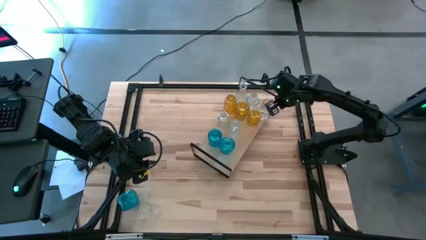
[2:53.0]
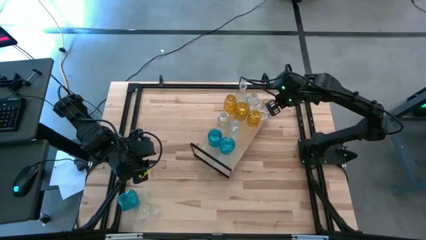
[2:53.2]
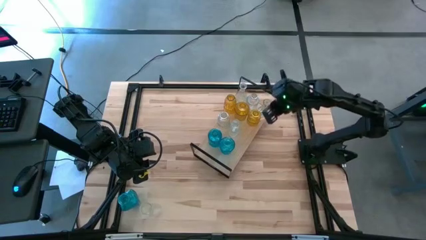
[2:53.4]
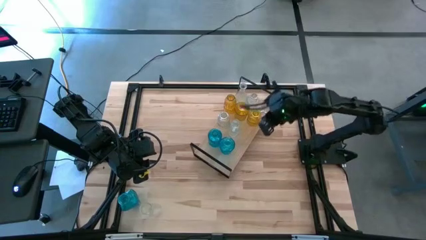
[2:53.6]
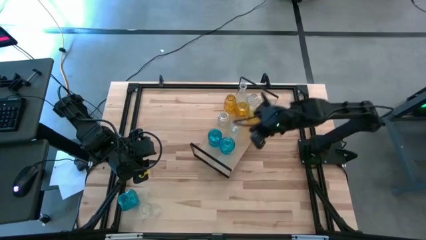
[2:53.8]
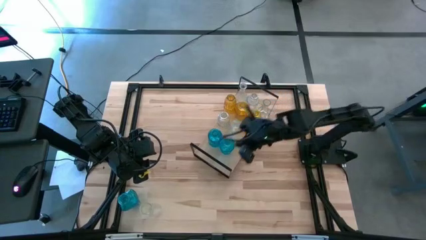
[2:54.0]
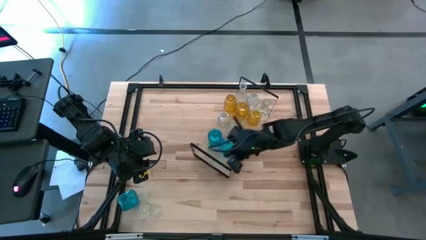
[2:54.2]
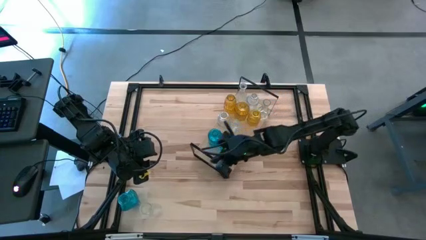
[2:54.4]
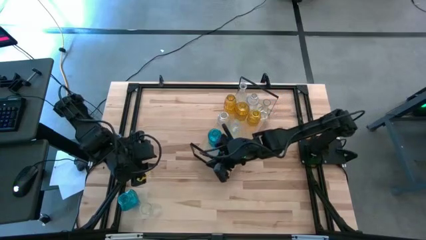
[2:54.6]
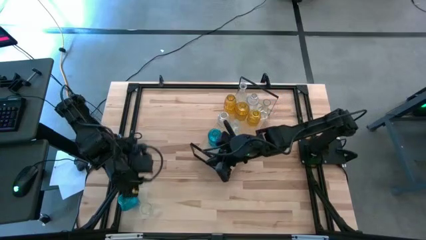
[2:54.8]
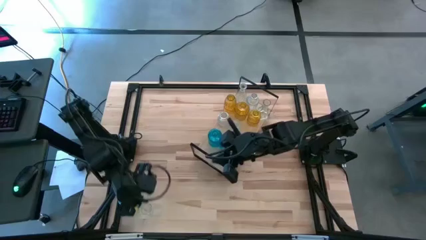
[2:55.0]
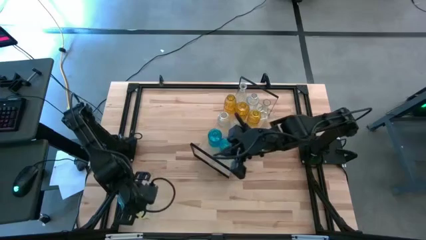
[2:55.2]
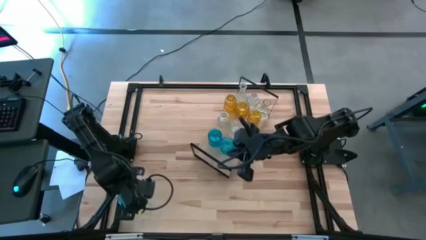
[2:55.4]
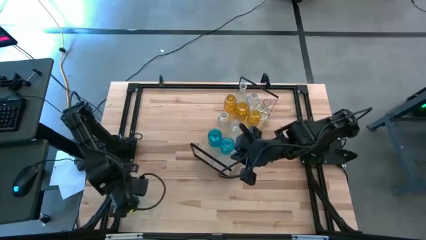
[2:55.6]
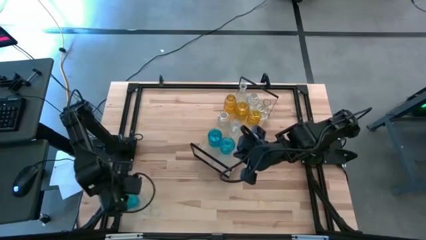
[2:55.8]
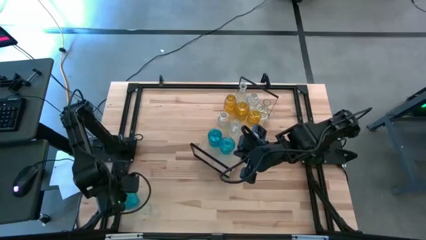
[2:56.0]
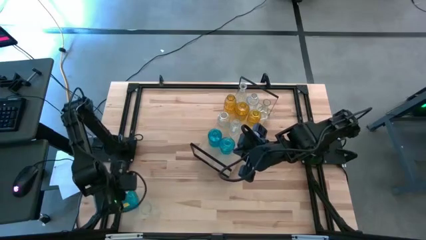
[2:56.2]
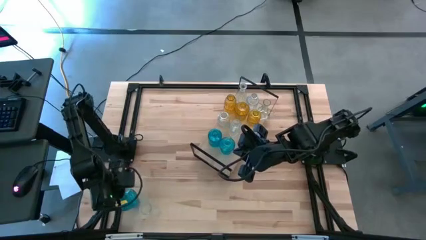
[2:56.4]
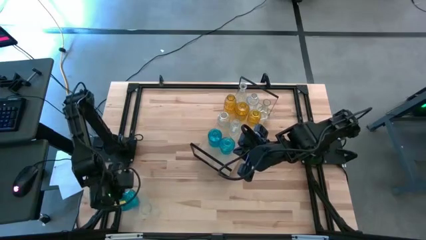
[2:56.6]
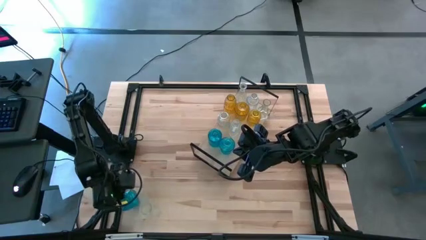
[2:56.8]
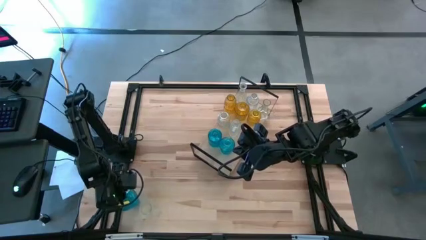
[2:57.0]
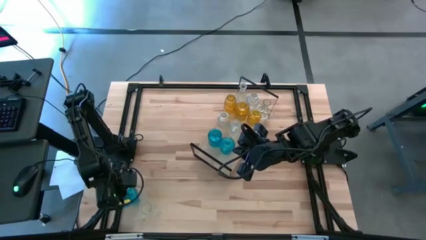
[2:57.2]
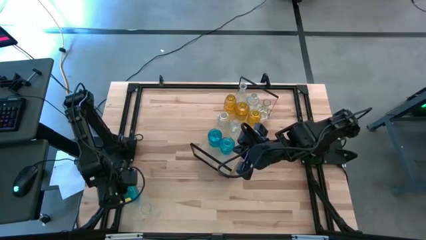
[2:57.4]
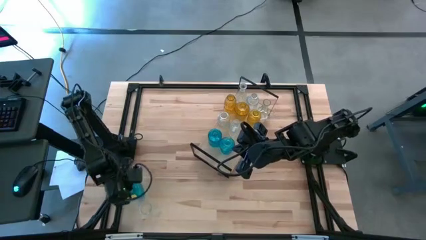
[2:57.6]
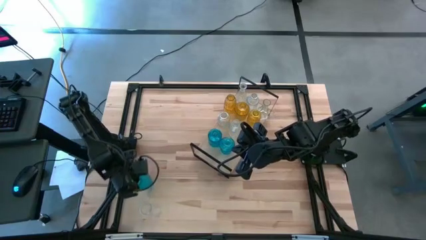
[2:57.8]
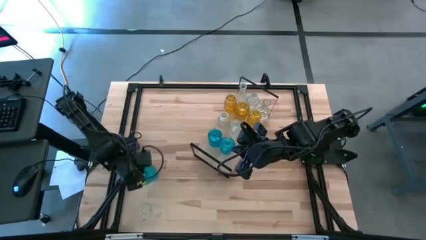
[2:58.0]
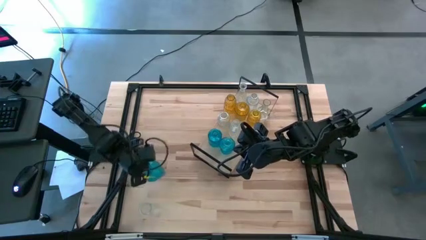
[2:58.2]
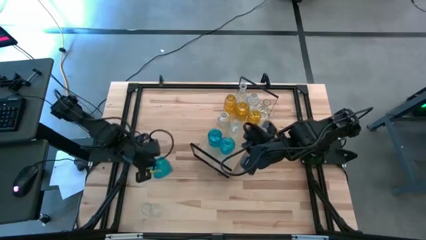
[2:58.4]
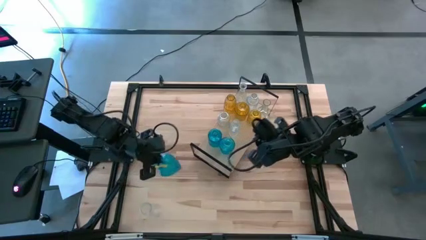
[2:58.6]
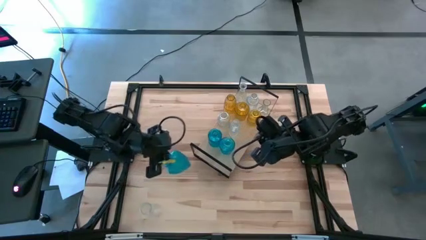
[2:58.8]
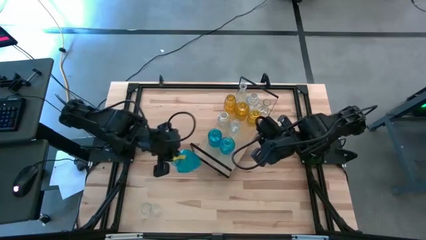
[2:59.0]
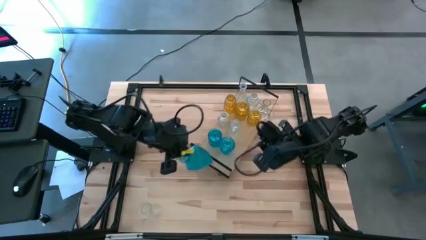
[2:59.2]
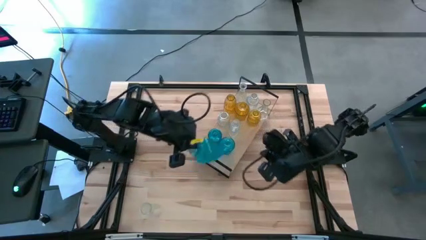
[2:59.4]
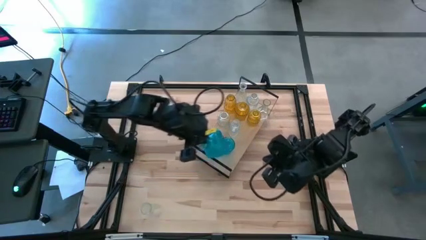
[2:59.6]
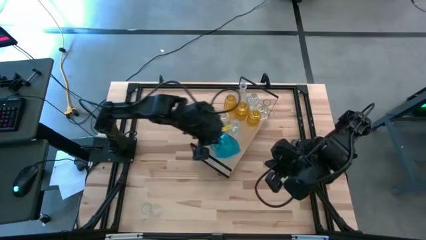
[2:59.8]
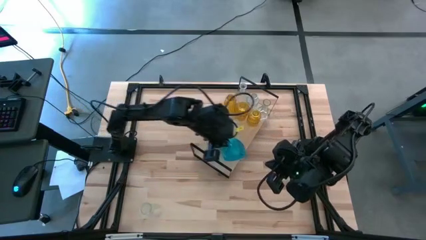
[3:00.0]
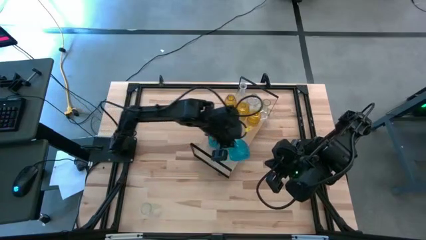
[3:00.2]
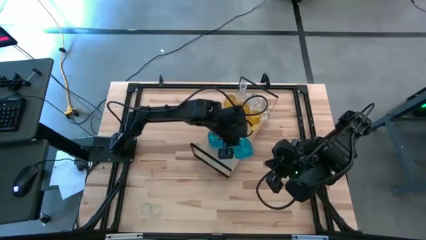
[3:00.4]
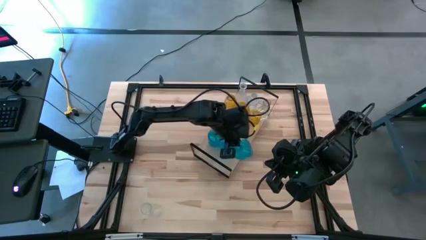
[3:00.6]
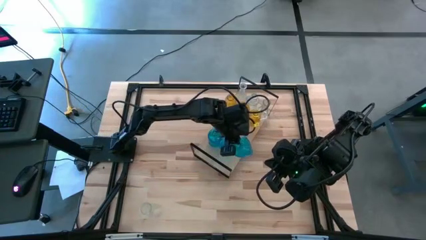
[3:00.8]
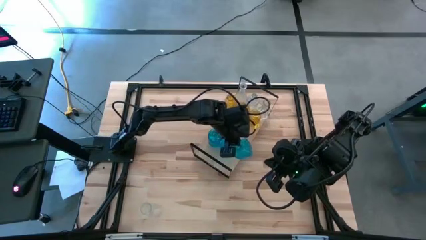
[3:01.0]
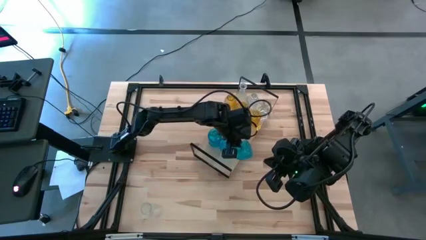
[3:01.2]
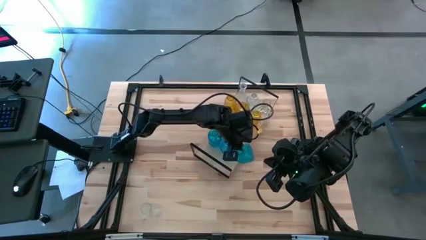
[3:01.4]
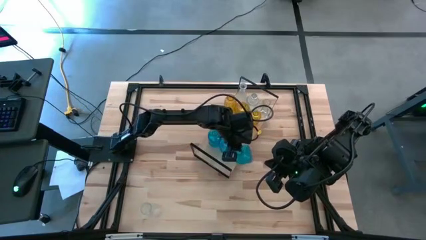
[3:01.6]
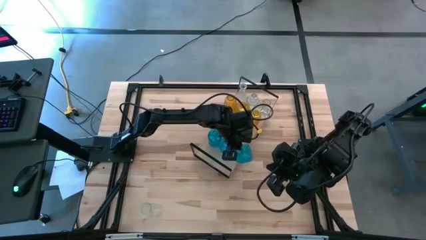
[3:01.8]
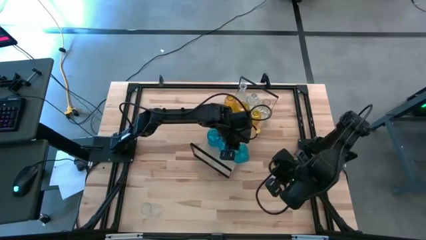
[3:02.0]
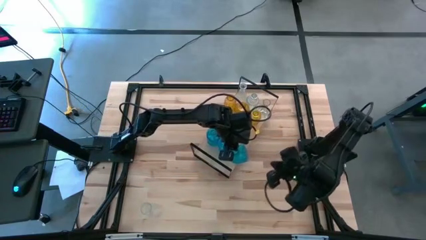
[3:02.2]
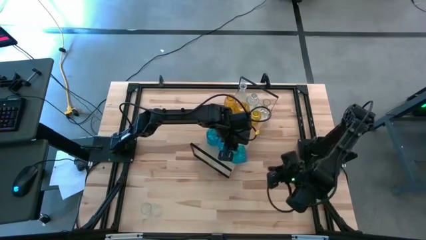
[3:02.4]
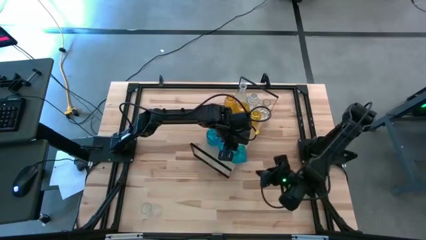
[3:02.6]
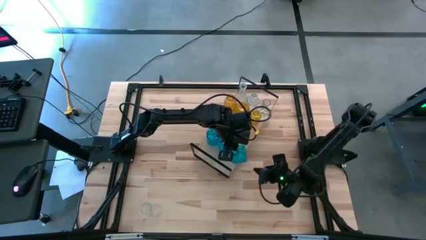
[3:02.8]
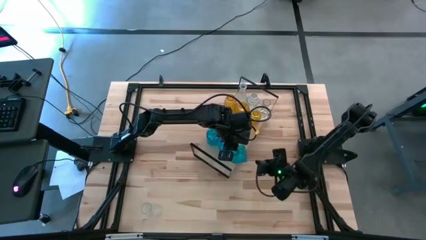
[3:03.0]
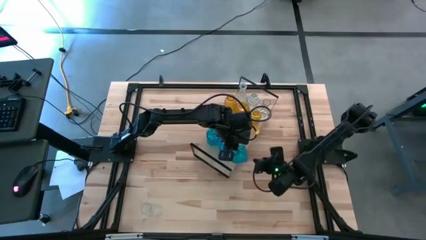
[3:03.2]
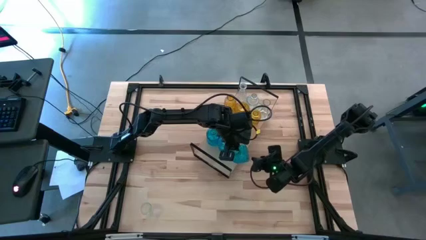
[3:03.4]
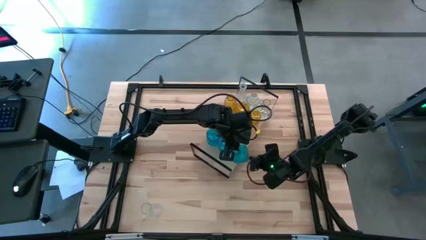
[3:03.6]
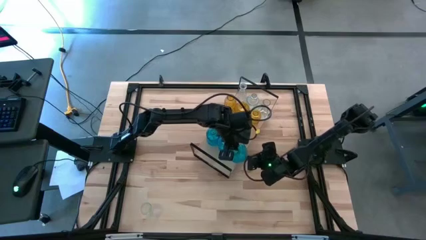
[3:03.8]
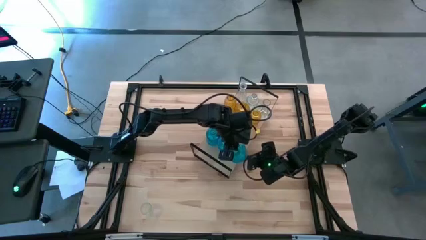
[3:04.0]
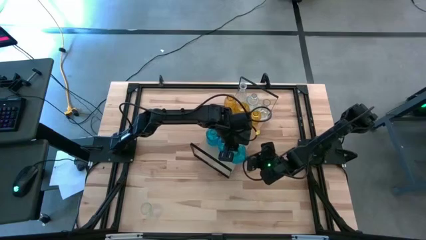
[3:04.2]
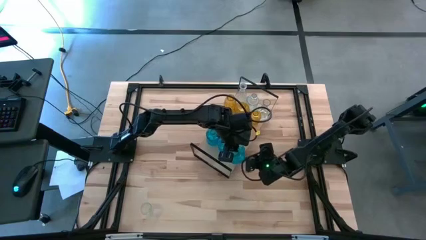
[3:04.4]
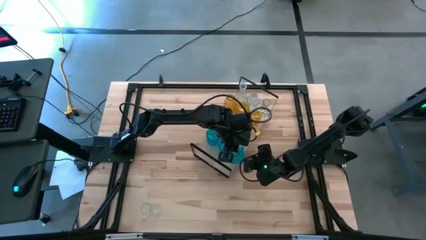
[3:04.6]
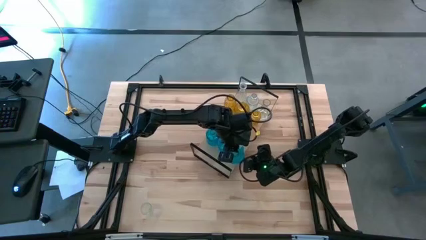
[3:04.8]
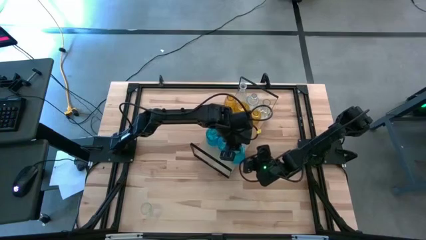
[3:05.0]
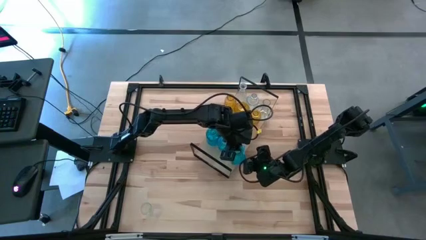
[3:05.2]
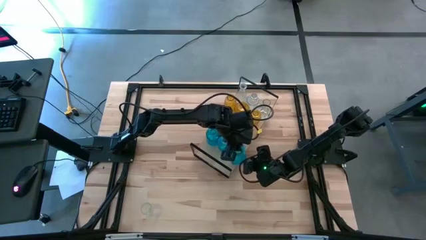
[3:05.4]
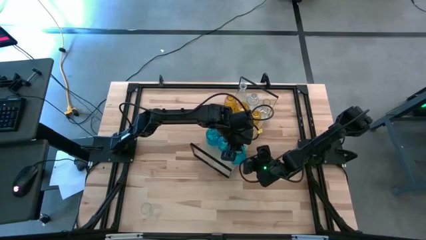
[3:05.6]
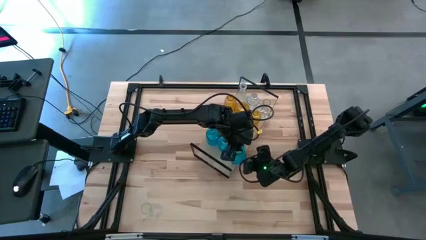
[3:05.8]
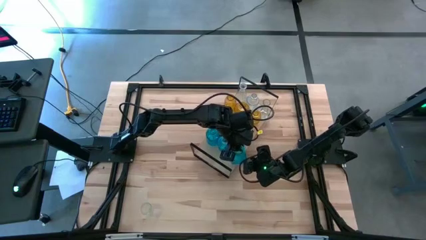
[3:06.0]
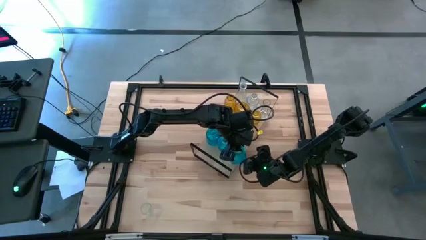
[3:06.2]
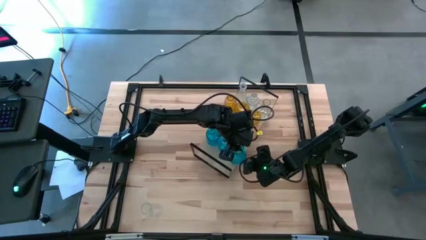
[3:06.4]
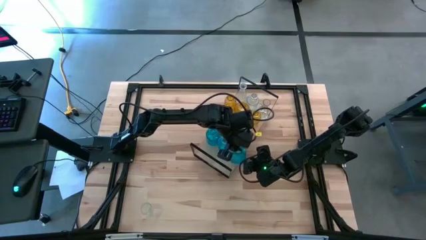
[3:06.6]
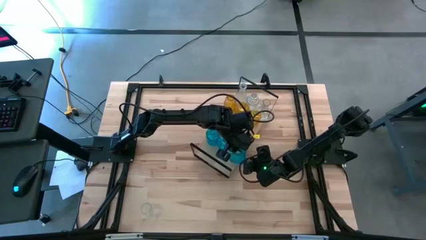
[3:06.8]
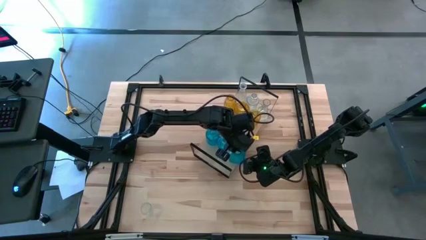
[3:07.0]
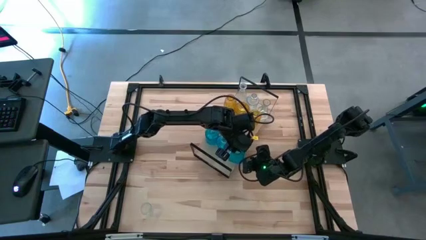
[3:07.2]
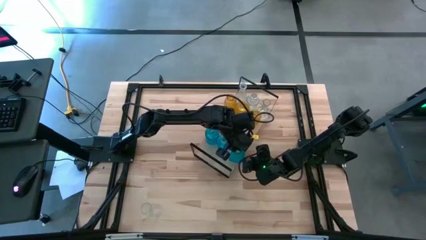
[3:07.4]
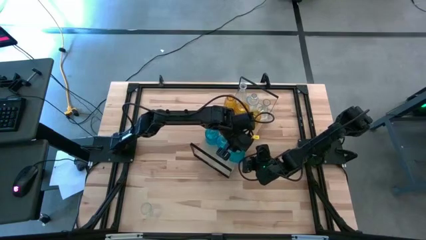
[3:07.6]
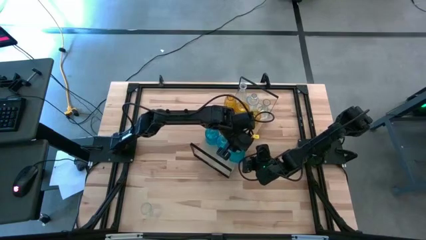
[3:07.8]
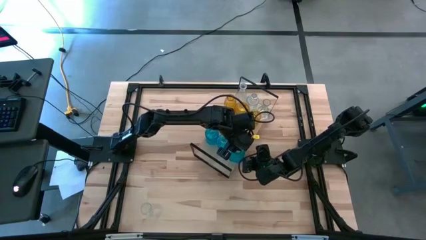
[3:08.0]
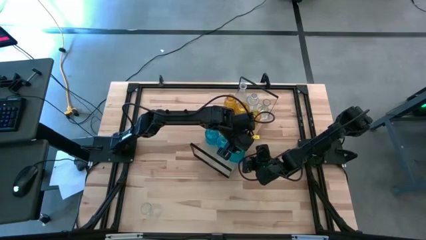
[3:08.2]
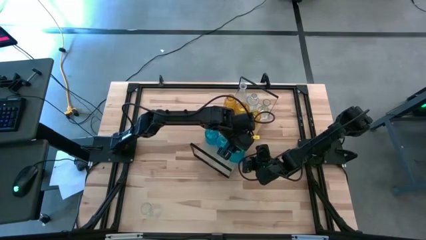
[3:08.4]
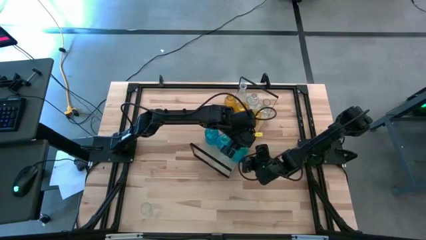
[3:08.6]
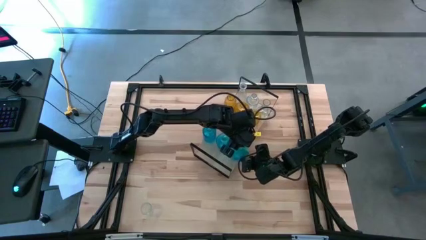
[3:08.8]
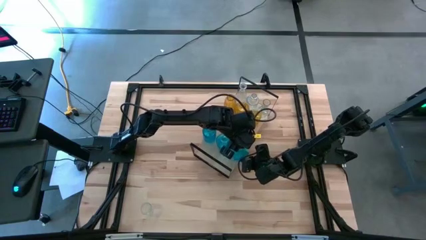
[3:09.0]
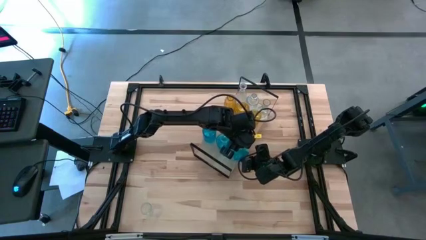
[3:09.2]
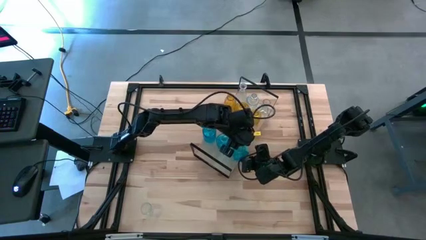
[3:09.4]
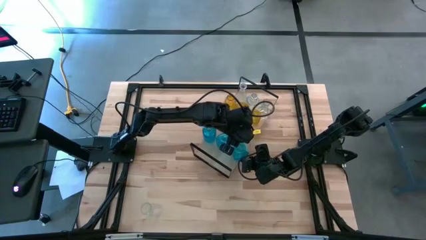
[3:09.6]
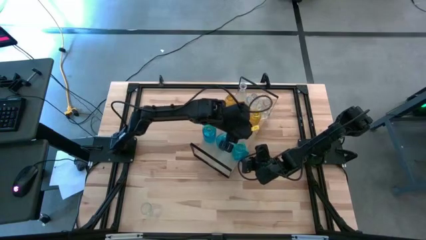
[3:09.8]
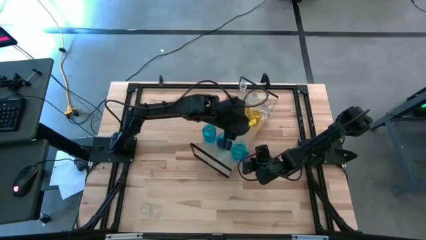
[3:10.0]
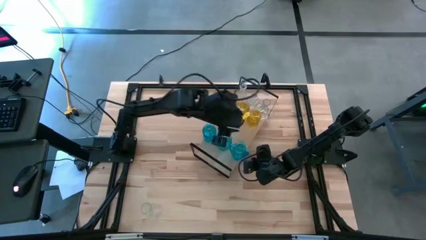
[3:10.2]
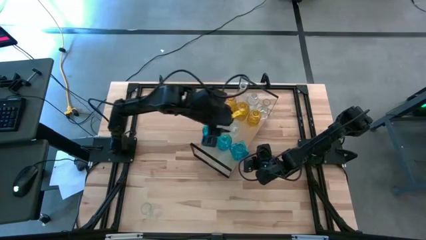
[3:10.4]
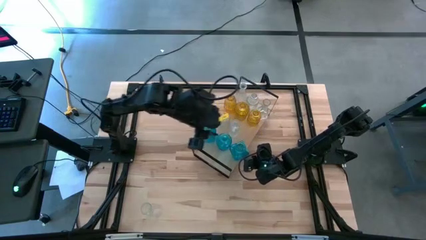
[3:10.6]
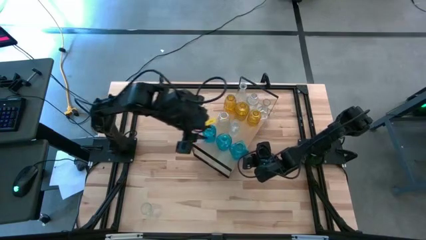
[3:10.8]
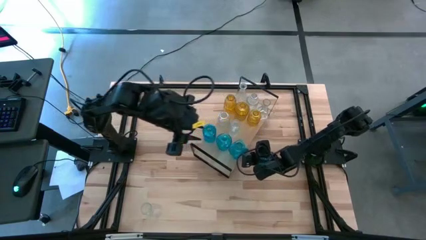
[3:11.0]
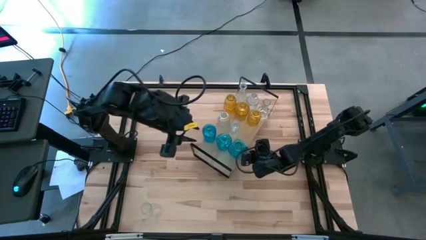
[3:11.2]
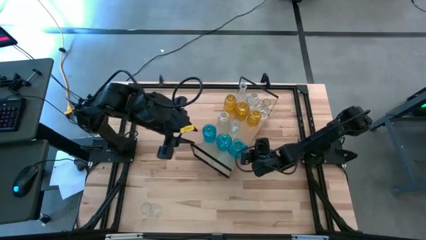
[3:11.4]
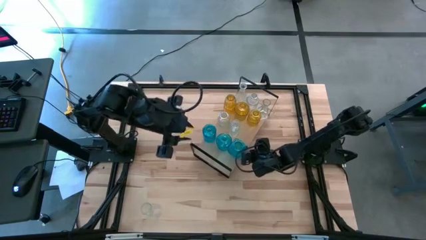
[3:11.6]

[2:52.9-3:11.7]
Task: sort vases onto shelf
Put the blue vase on the shelf and align with the other blue vase
